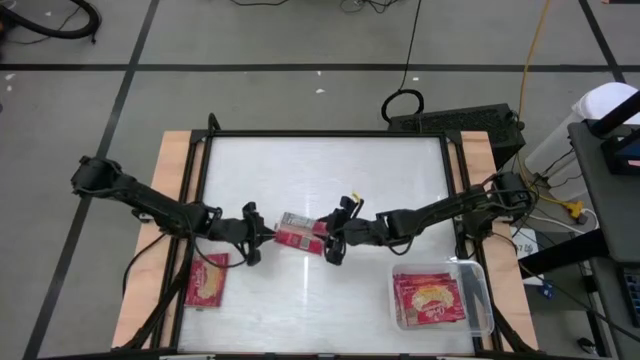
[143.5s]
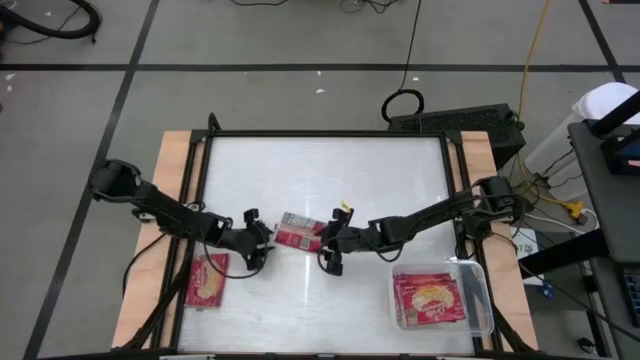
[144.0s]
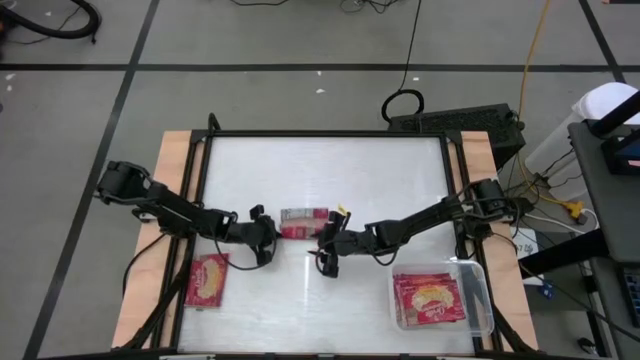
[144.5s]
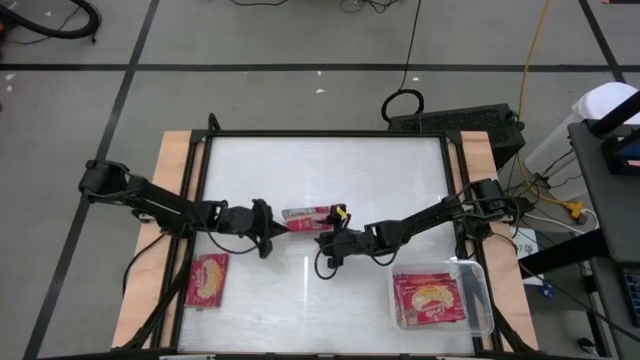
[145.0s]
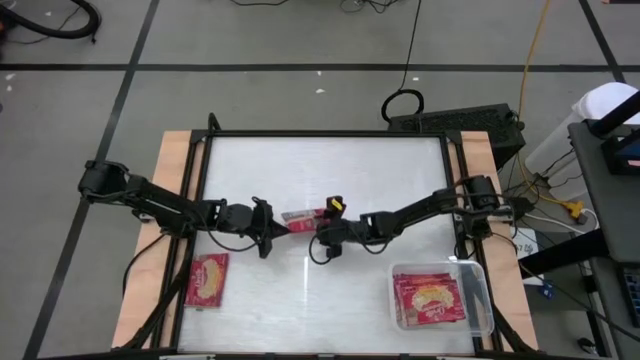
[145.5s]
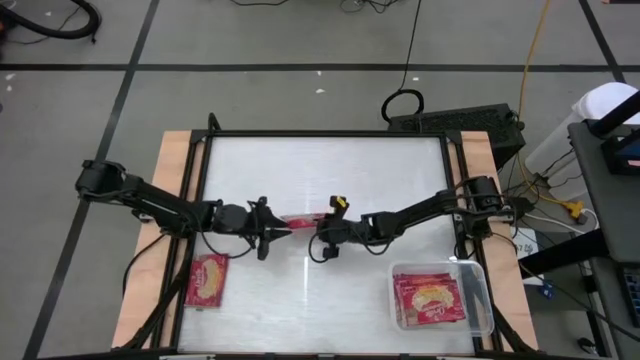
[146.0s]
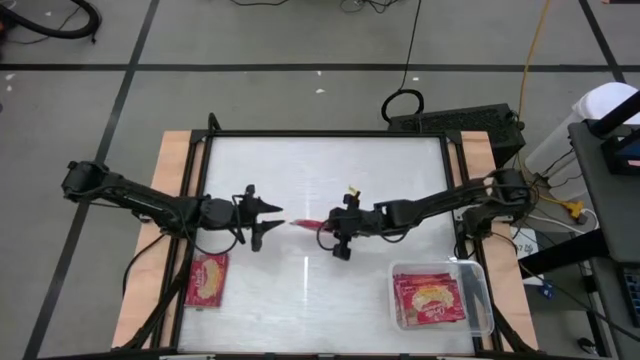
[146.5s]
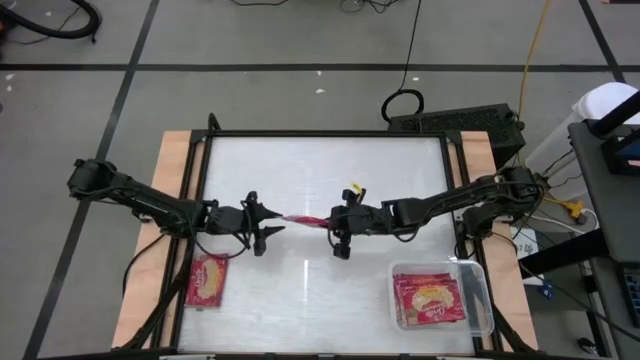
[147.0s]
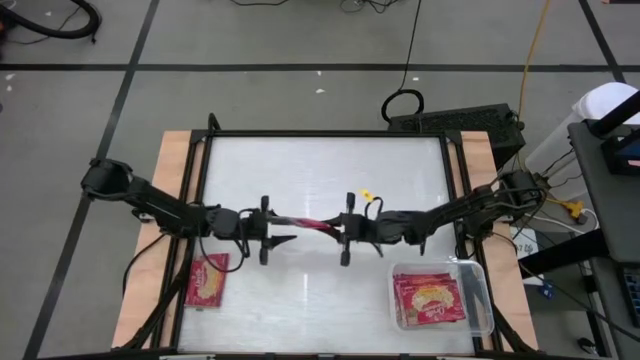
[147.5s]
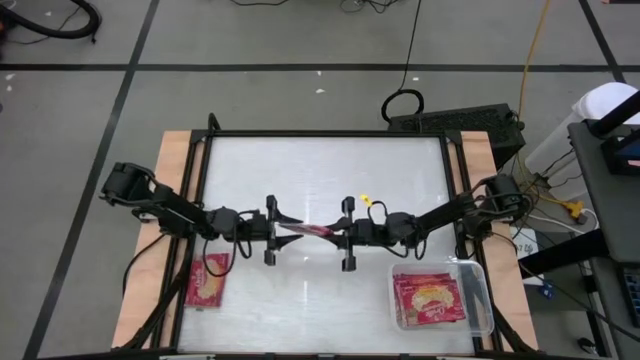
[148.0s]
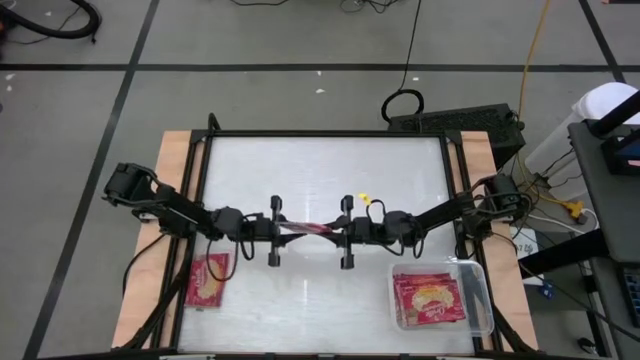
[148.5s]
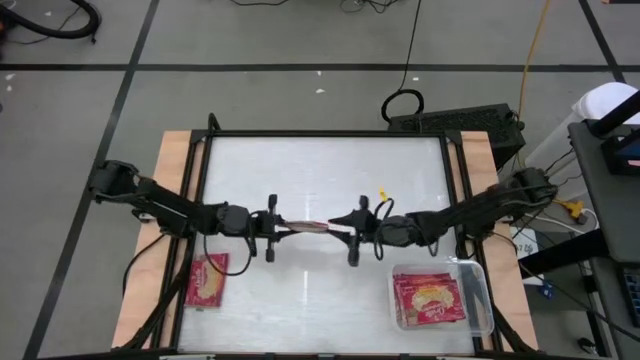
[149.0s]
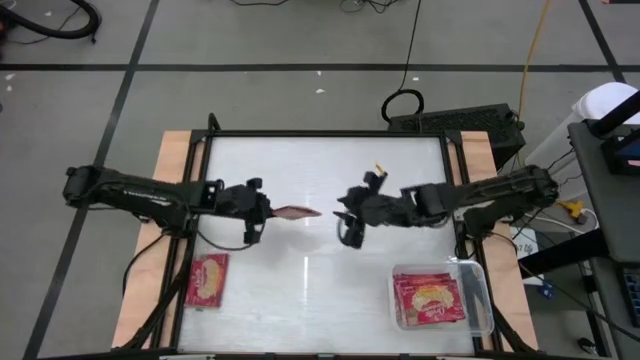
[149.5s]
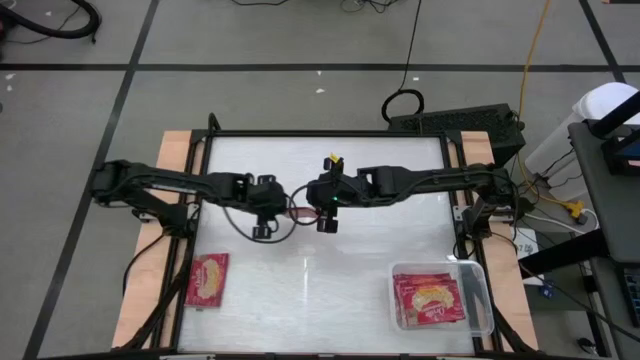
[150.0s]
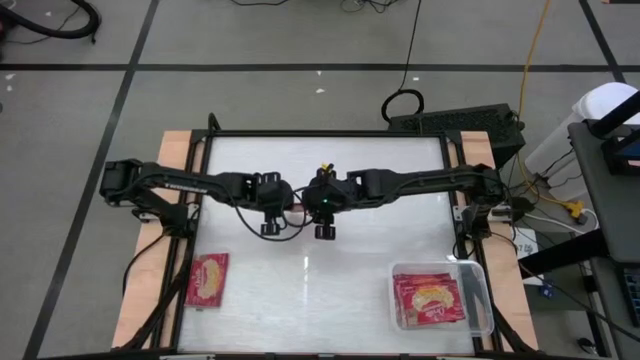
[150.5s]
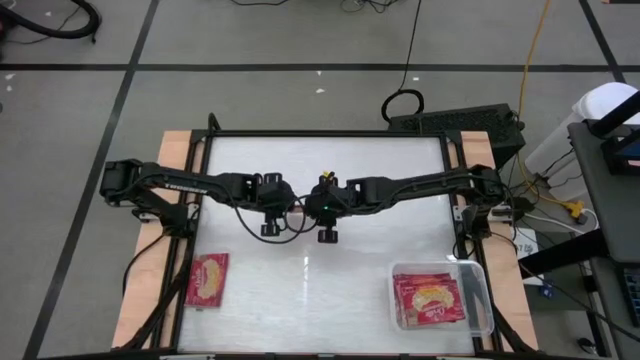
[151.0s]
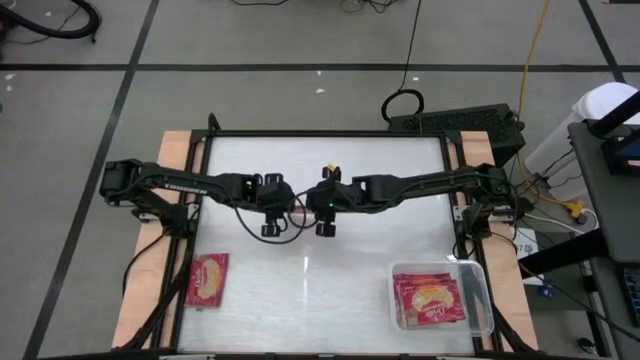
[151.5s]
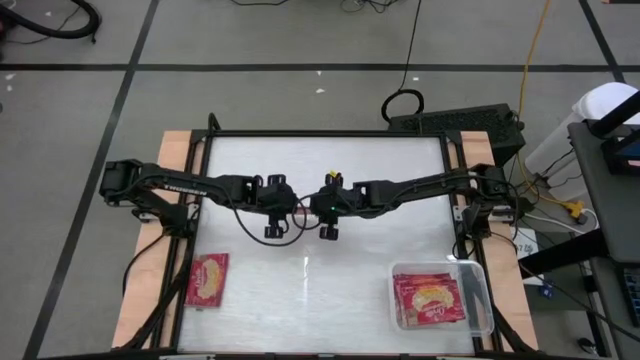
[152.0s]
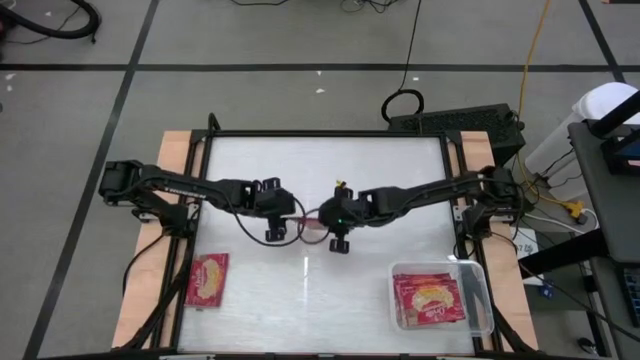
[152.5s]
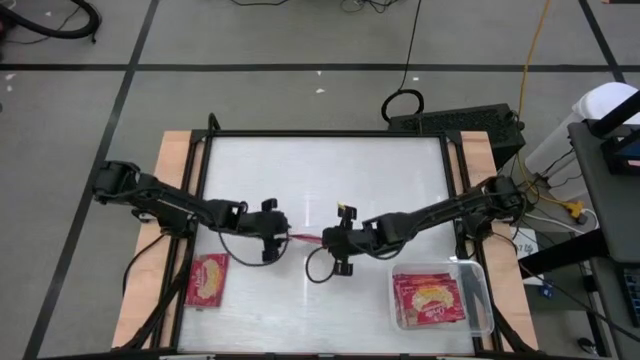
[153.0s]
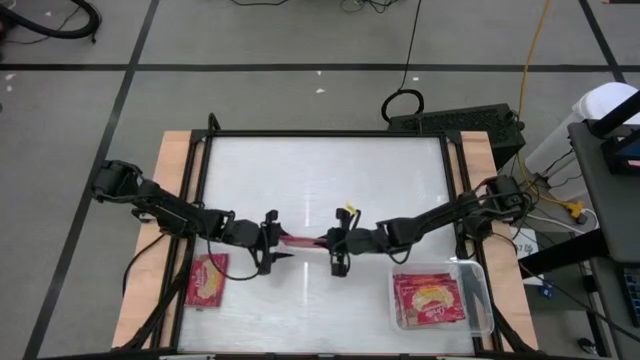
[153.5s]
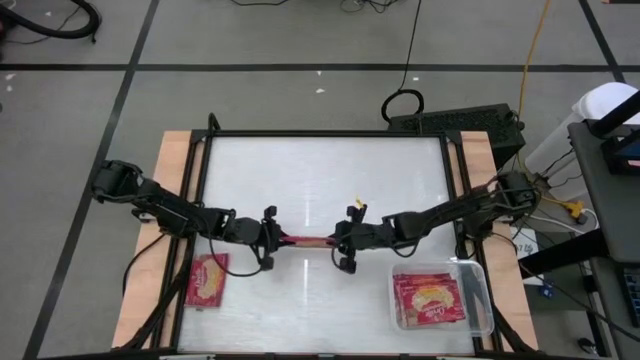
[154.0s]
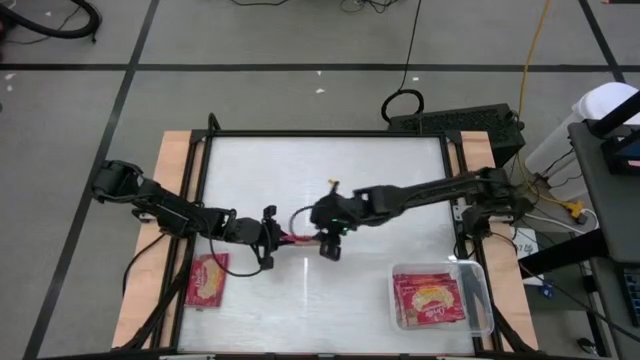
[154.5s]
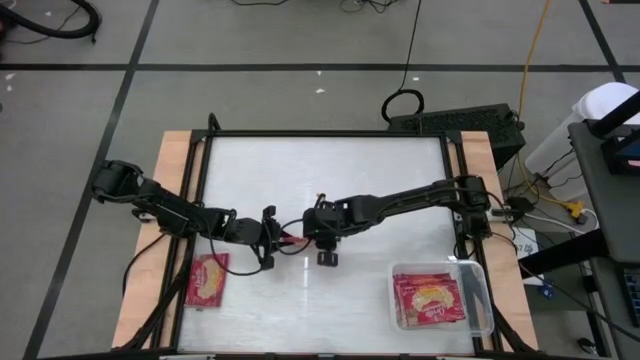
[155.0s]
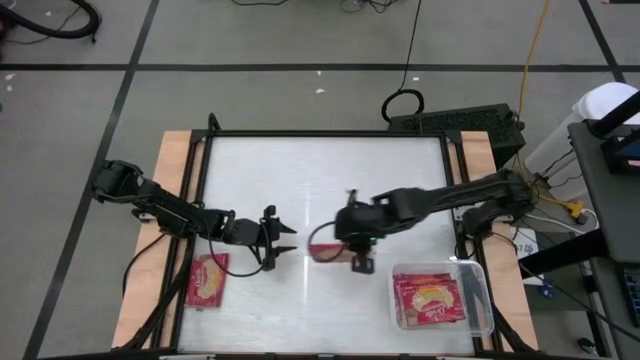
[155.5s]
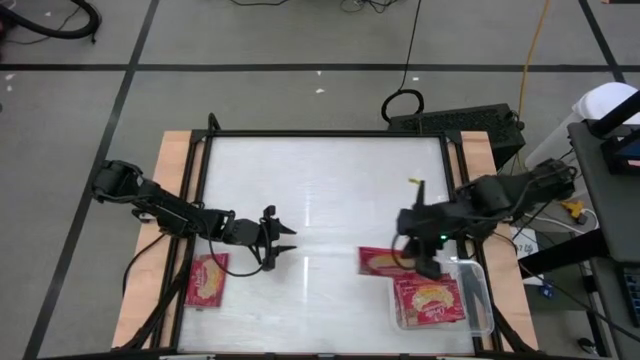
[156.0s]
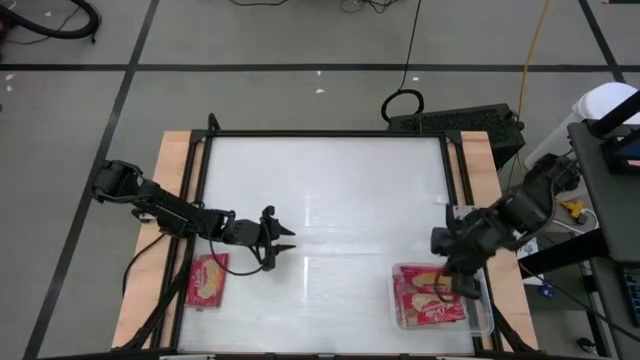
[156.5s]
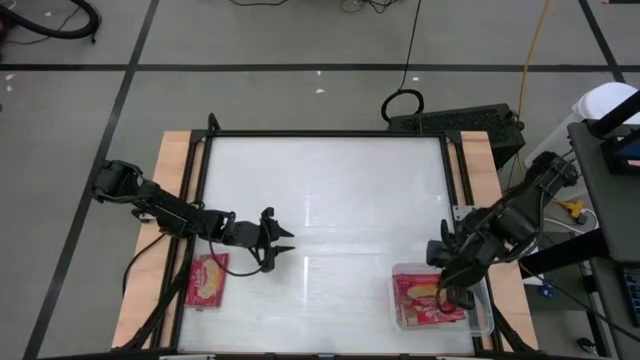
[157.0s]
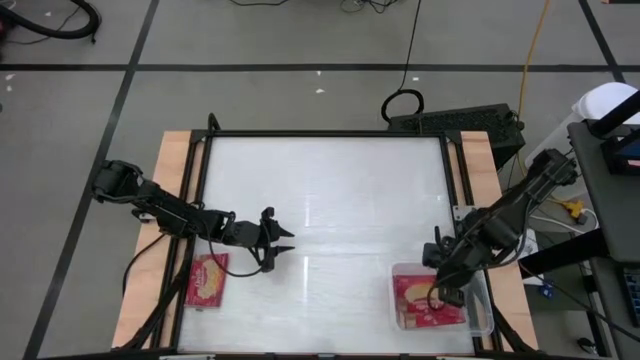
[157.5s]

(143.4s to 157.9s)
Task: Sort popcorn bags into baskets
Put the red popcorn pack into the transparent bin

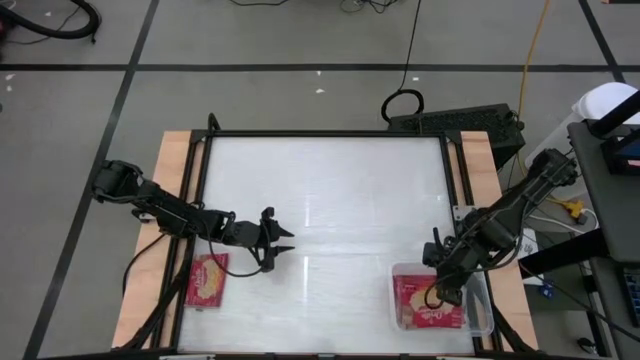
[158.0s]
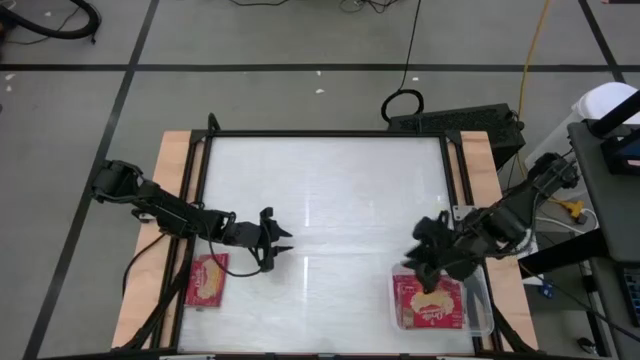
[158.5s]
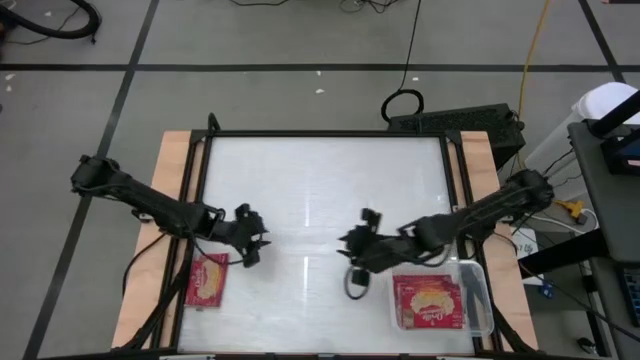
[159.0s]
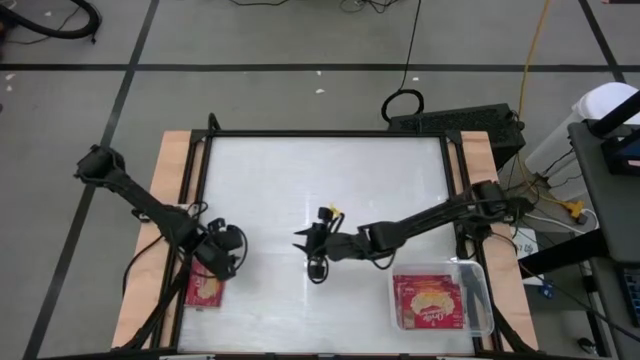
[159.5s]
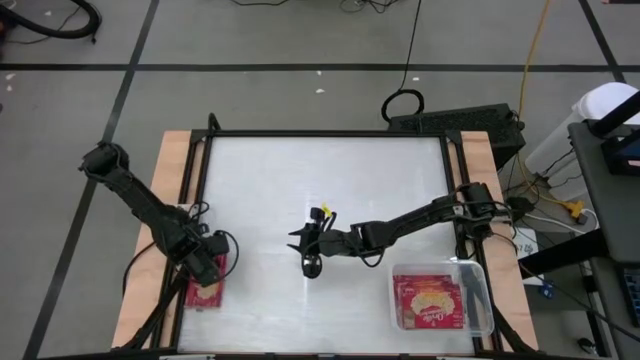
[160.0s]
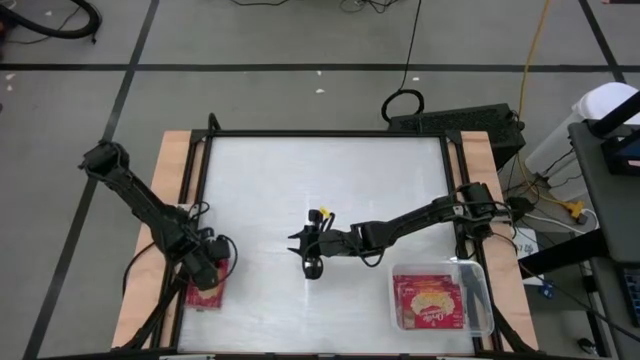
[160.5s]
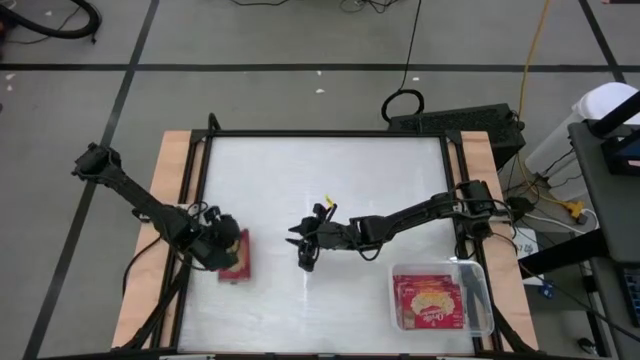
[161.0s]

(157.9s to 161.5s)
Put the red popcorn pack into the transparent bin

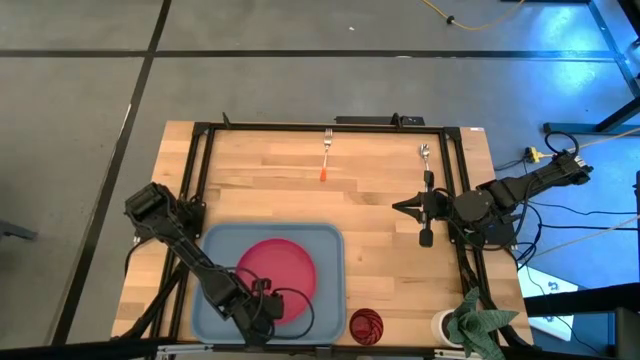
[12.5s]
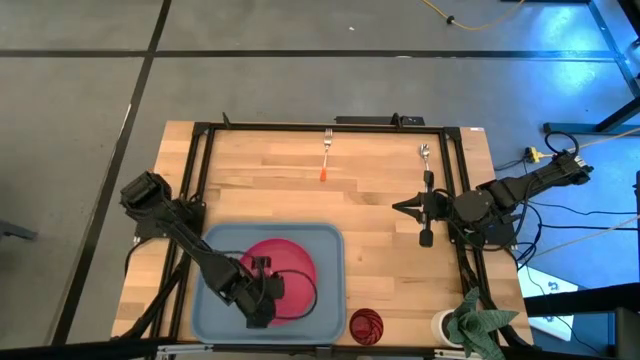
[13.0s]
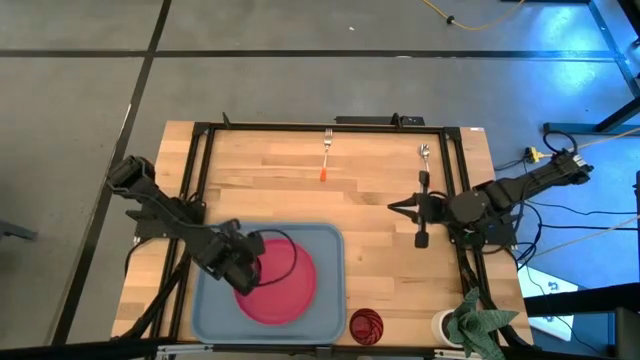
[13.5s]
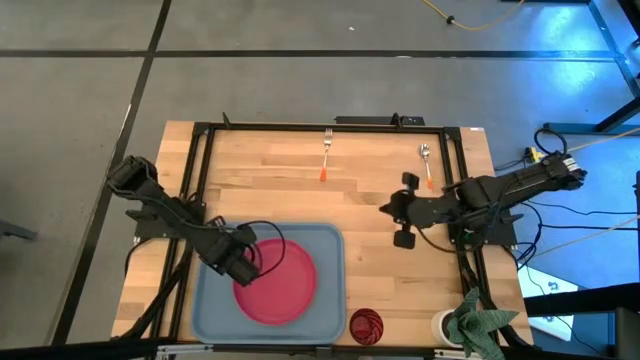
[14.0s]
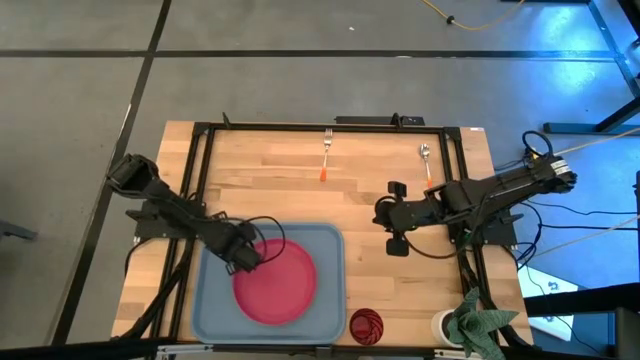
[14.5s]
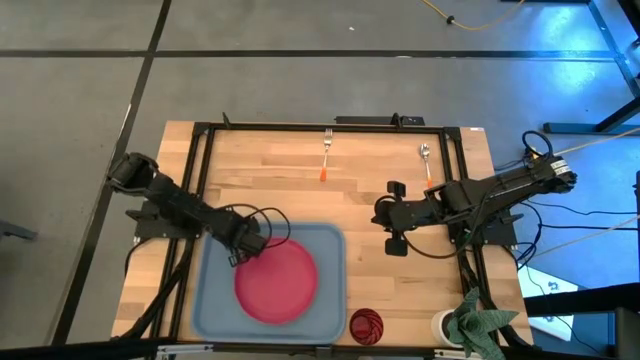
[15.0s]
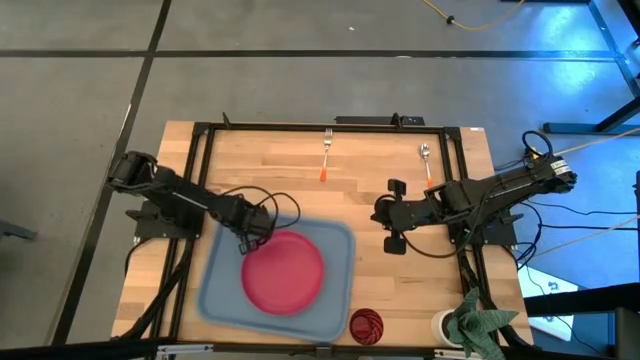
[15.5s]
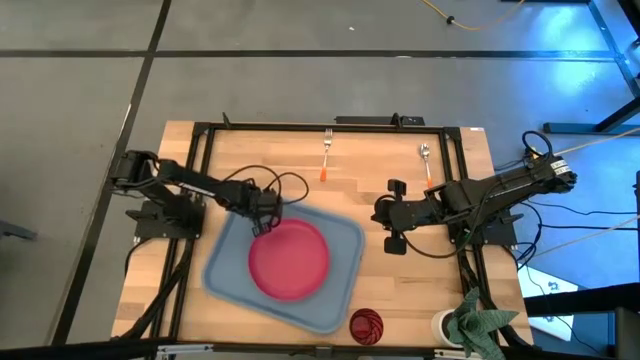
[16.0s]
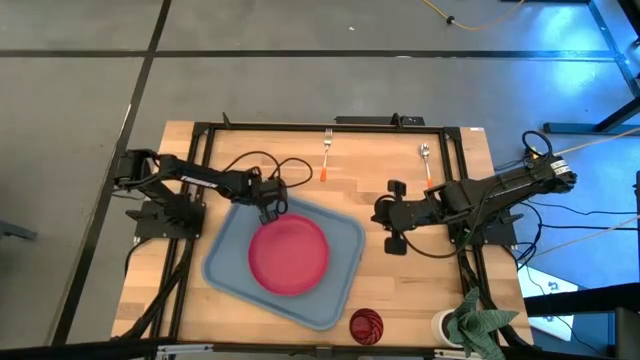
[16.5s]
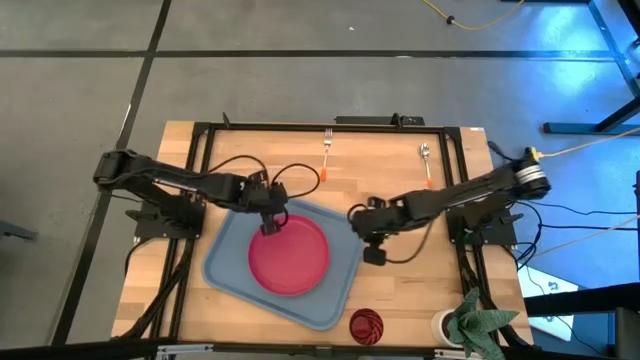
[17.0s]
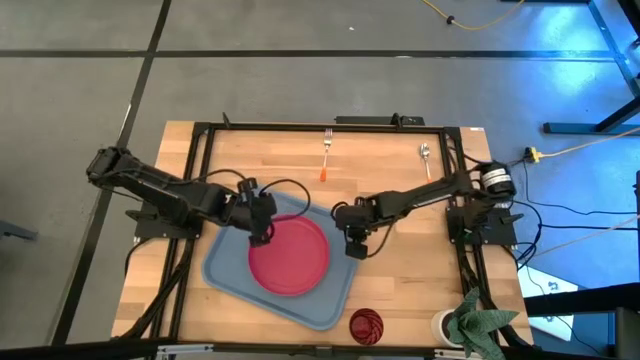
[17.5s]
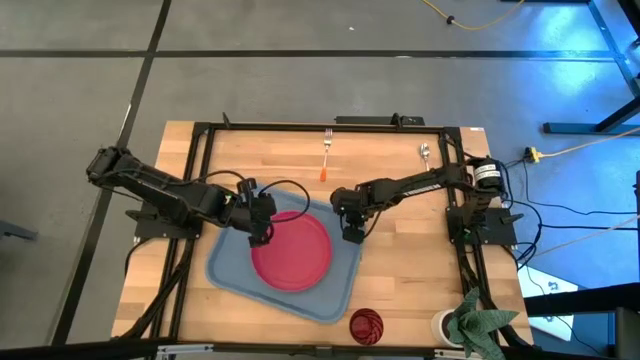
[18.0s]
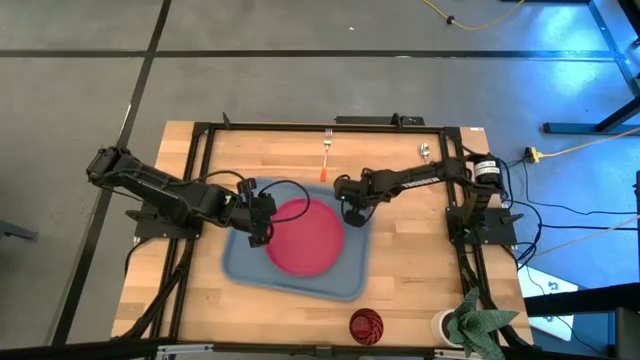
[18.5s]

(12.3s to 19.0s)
Task: Pick and place plate/cup/fork/spoon on tray
Move the blue serving tray to the center of the table
